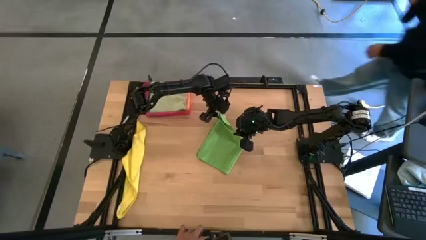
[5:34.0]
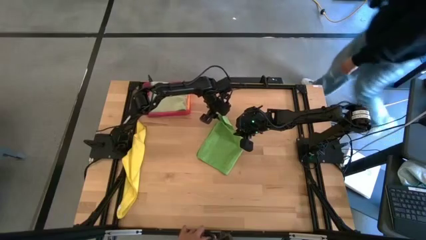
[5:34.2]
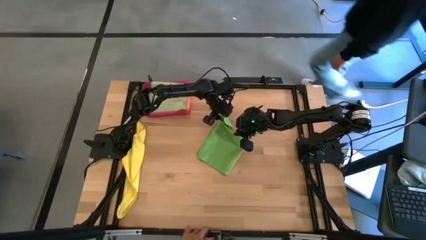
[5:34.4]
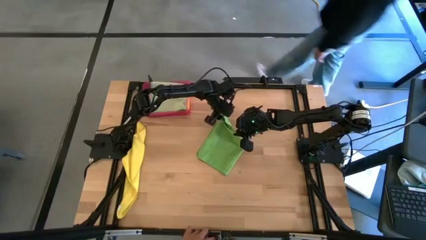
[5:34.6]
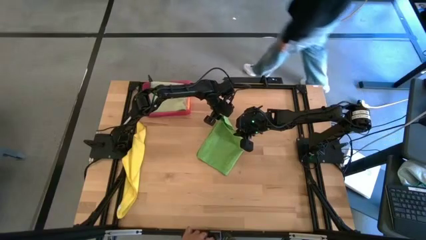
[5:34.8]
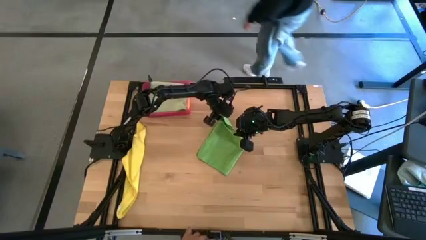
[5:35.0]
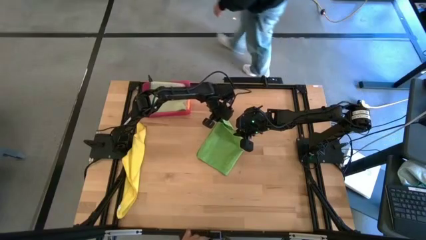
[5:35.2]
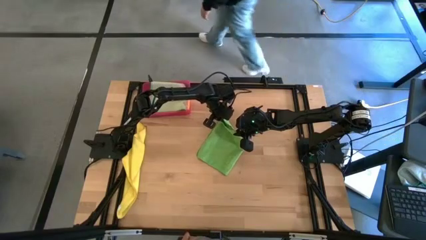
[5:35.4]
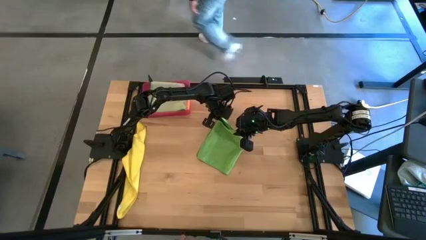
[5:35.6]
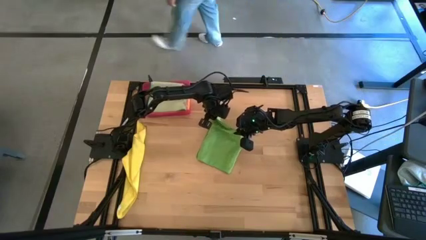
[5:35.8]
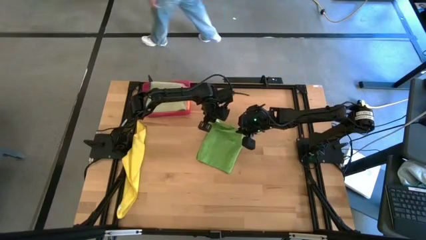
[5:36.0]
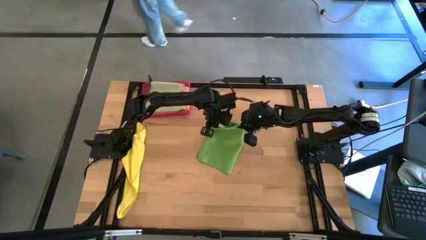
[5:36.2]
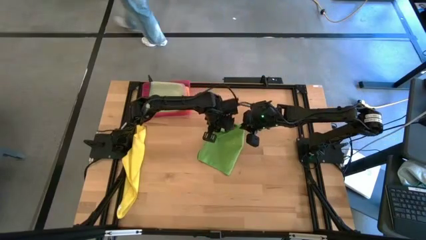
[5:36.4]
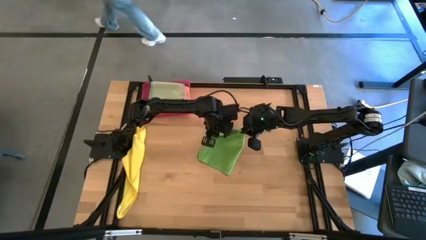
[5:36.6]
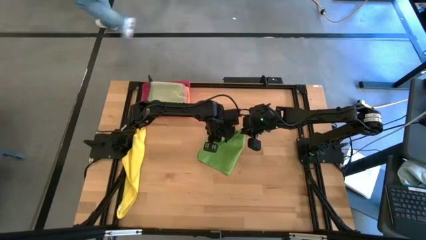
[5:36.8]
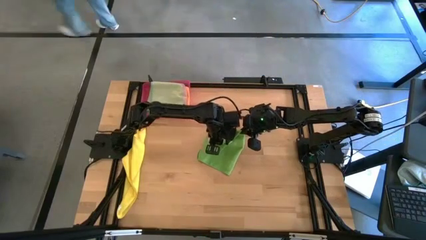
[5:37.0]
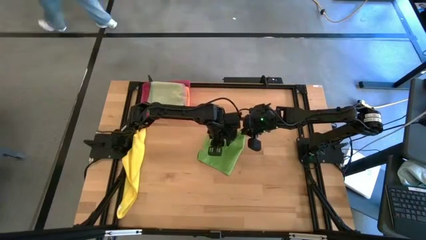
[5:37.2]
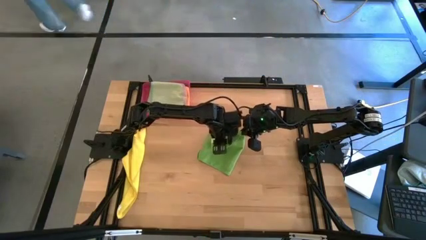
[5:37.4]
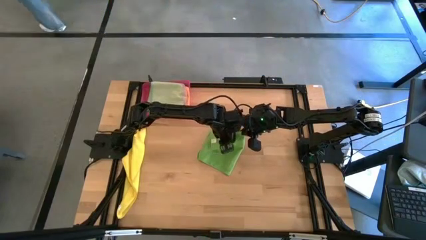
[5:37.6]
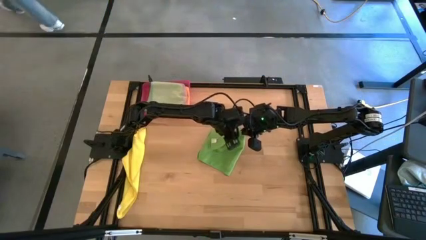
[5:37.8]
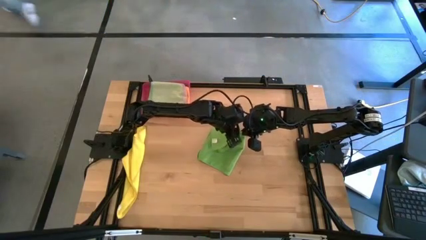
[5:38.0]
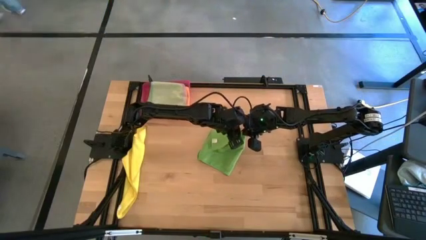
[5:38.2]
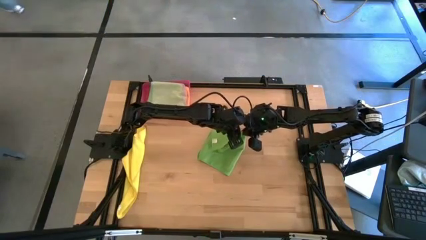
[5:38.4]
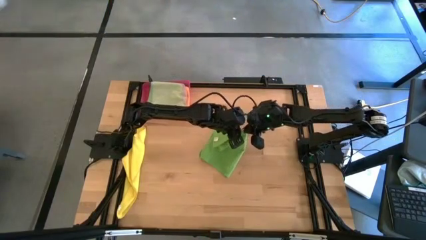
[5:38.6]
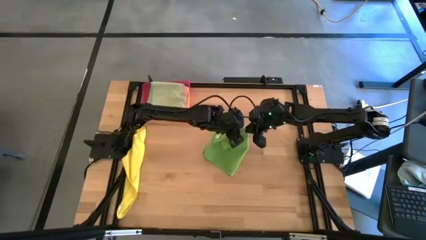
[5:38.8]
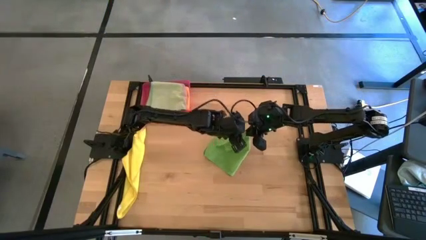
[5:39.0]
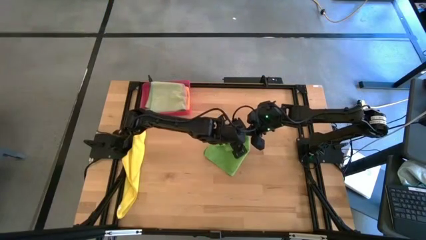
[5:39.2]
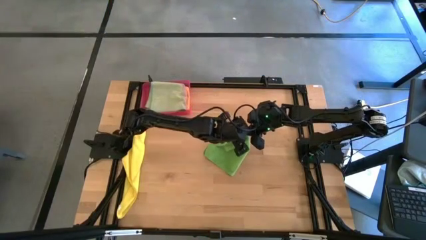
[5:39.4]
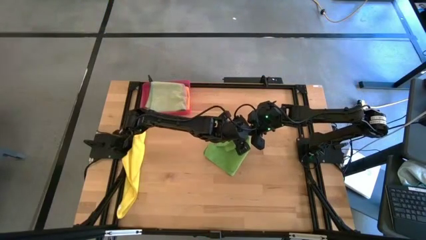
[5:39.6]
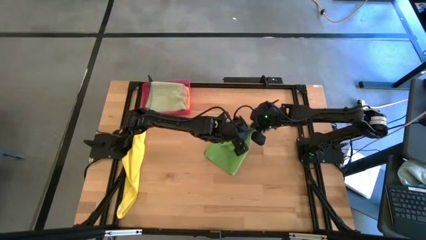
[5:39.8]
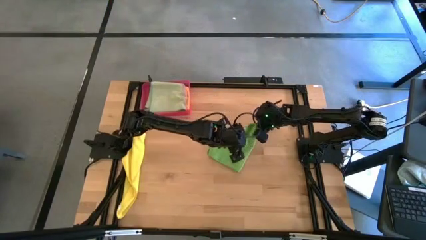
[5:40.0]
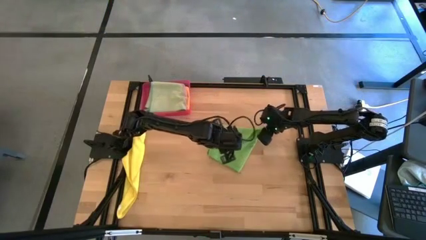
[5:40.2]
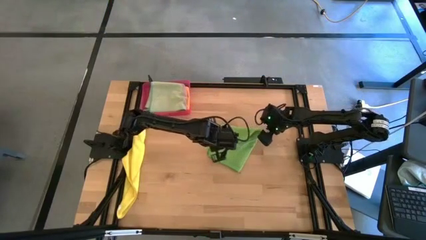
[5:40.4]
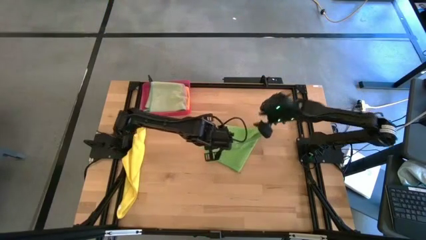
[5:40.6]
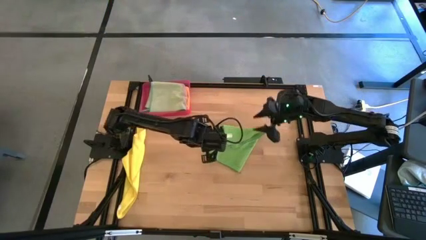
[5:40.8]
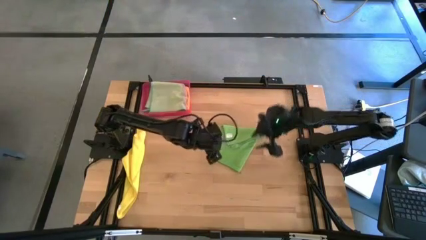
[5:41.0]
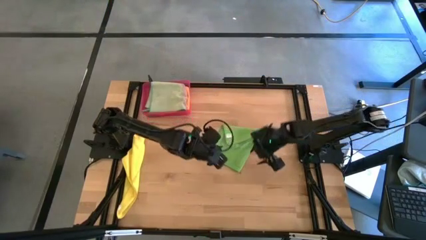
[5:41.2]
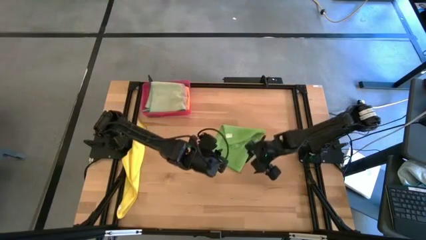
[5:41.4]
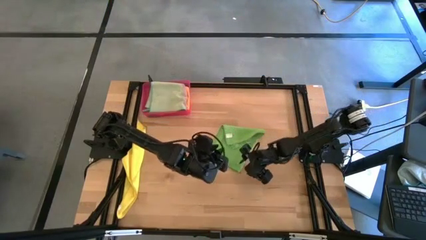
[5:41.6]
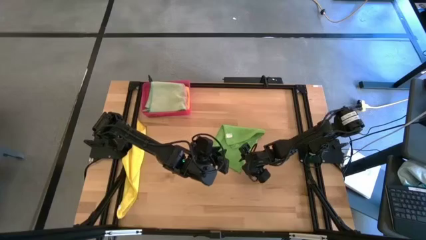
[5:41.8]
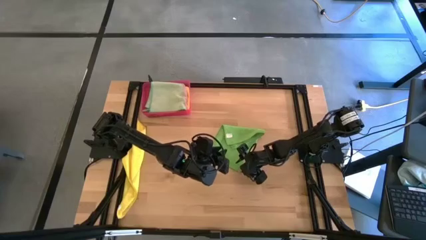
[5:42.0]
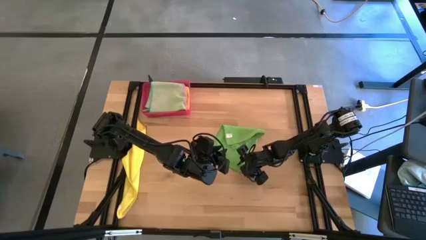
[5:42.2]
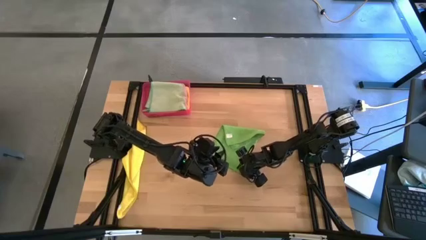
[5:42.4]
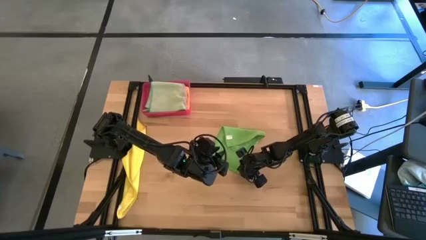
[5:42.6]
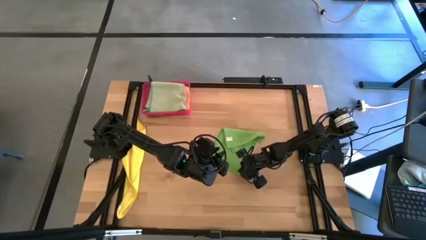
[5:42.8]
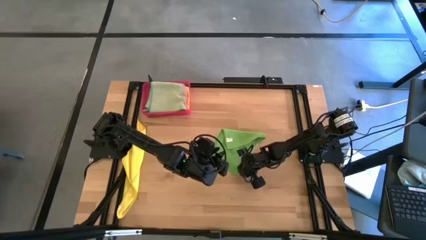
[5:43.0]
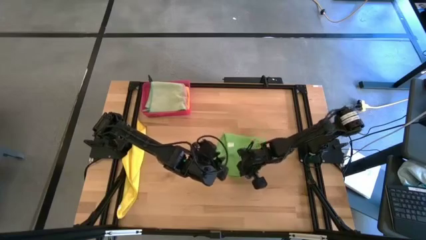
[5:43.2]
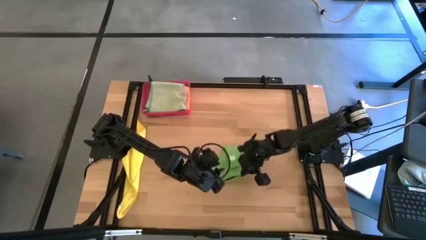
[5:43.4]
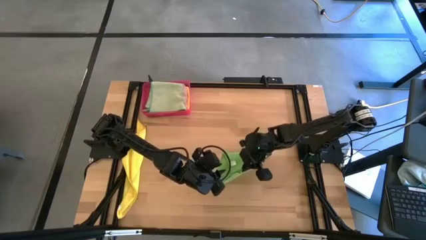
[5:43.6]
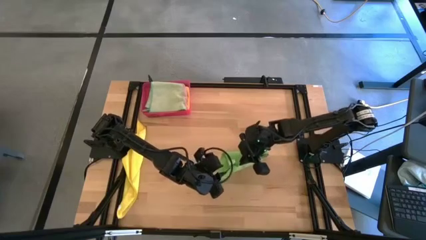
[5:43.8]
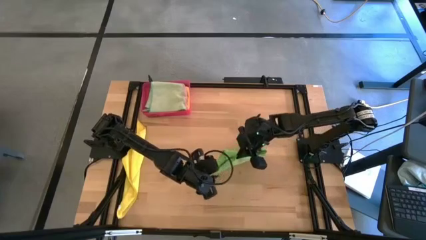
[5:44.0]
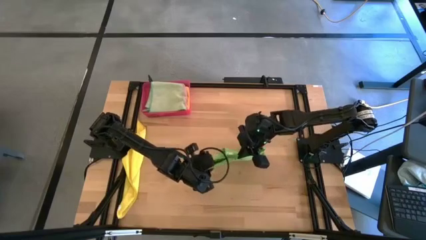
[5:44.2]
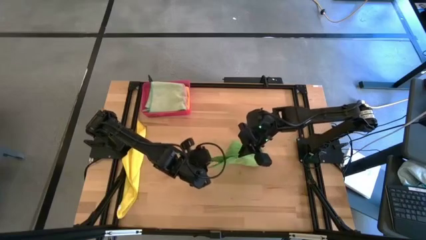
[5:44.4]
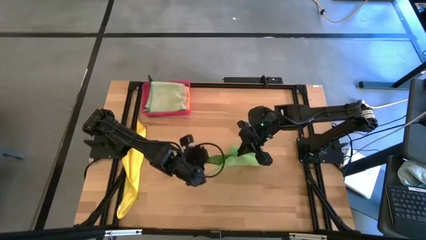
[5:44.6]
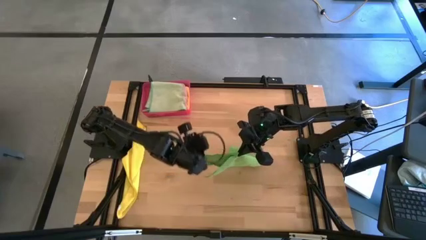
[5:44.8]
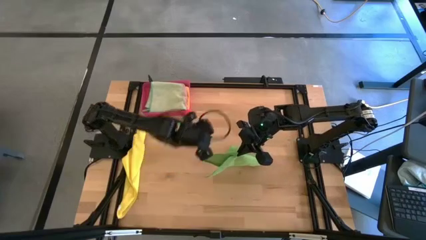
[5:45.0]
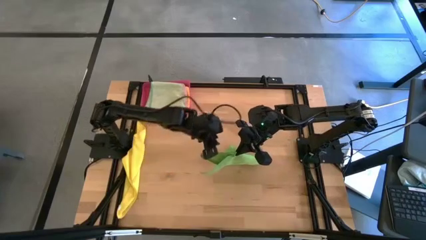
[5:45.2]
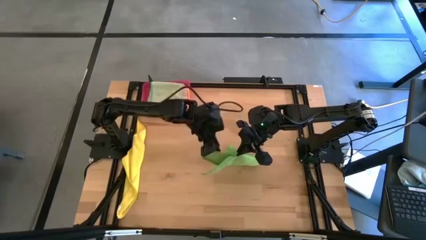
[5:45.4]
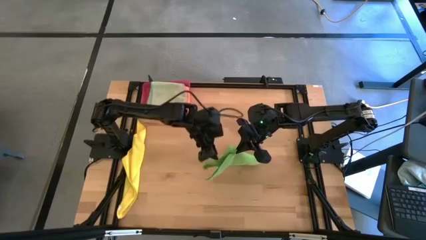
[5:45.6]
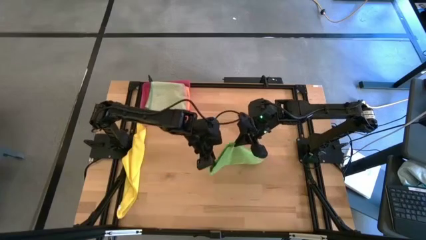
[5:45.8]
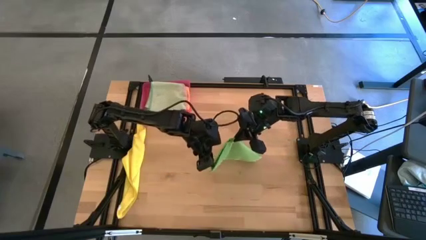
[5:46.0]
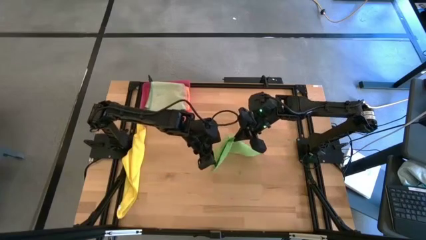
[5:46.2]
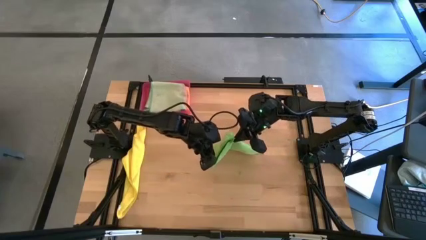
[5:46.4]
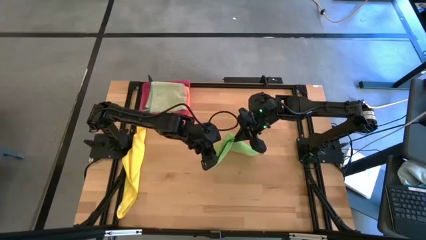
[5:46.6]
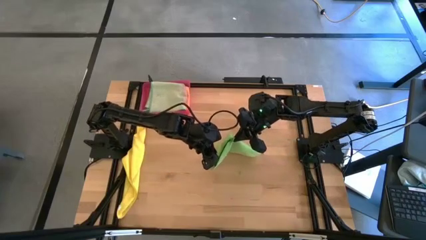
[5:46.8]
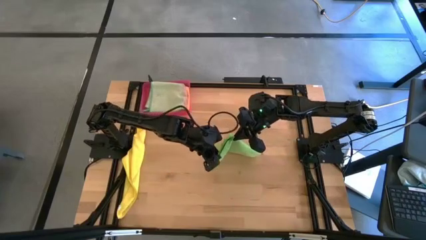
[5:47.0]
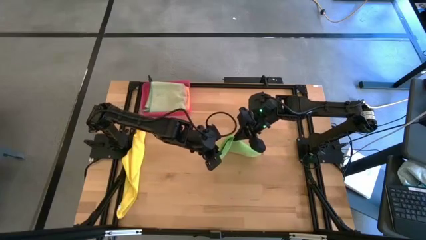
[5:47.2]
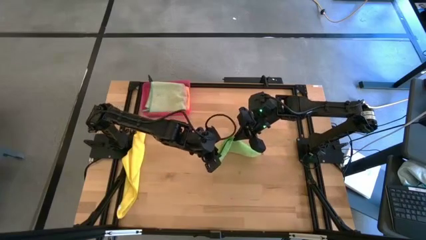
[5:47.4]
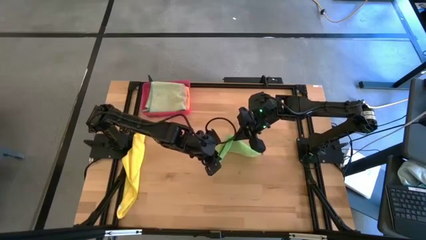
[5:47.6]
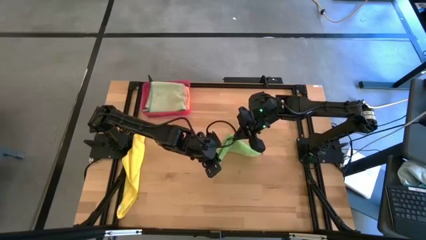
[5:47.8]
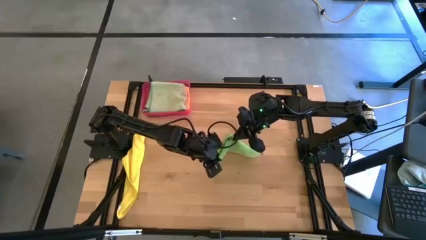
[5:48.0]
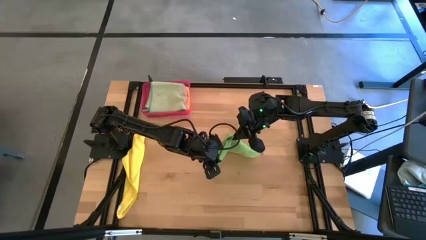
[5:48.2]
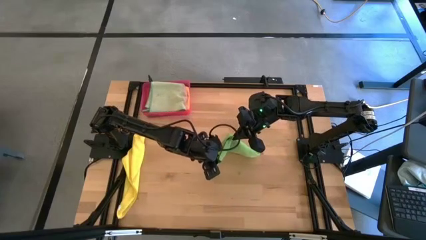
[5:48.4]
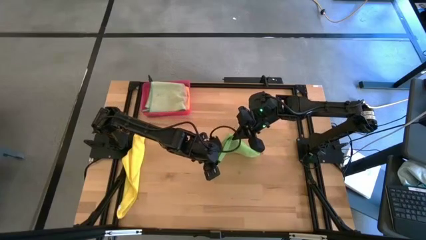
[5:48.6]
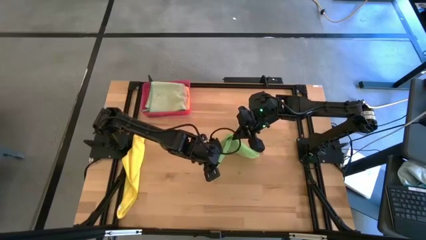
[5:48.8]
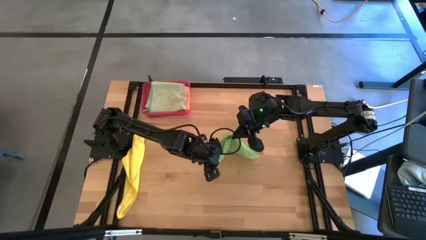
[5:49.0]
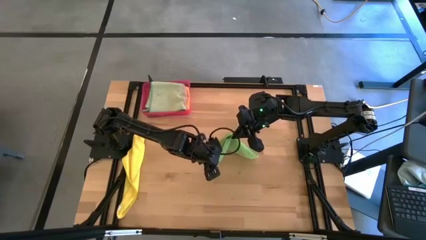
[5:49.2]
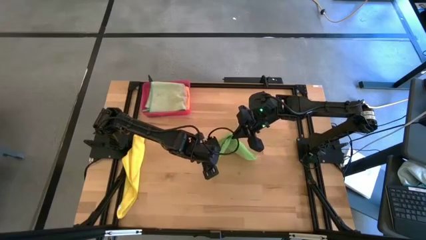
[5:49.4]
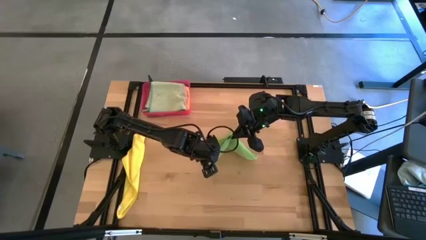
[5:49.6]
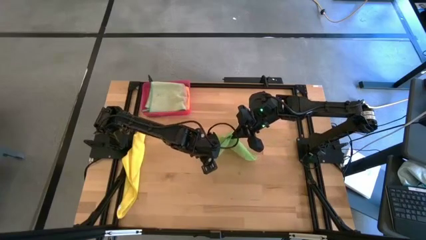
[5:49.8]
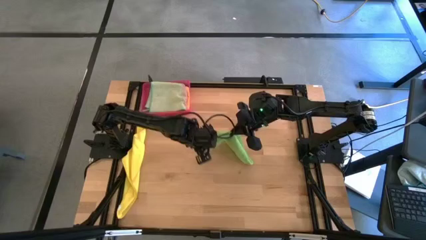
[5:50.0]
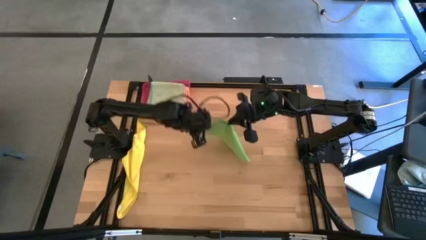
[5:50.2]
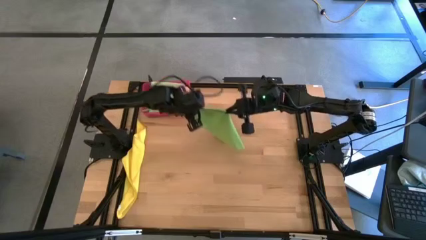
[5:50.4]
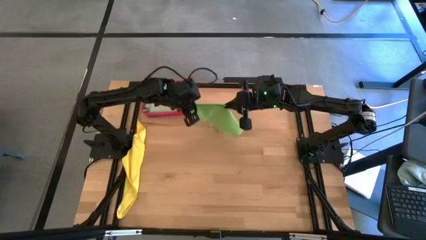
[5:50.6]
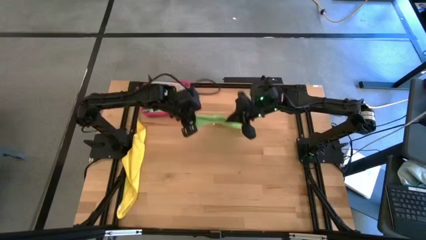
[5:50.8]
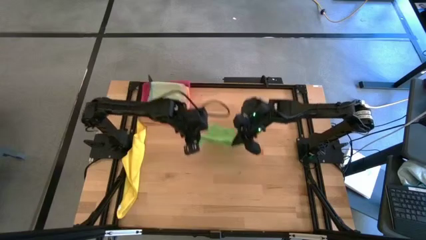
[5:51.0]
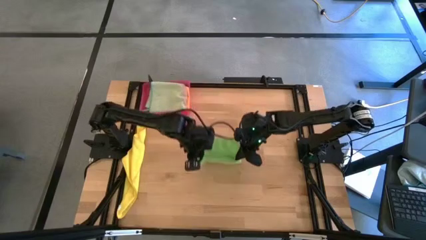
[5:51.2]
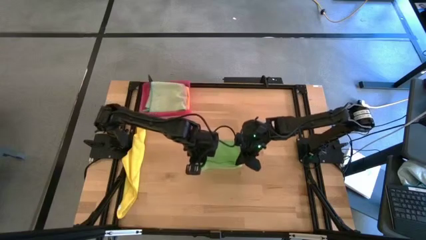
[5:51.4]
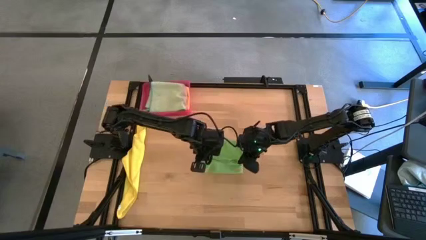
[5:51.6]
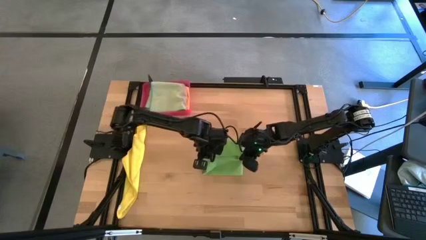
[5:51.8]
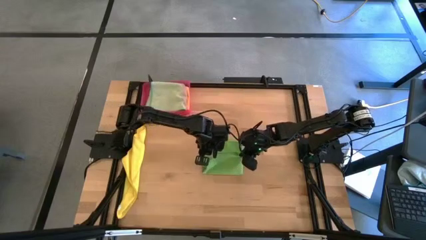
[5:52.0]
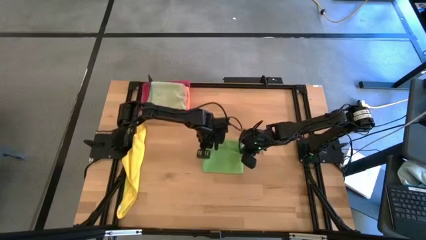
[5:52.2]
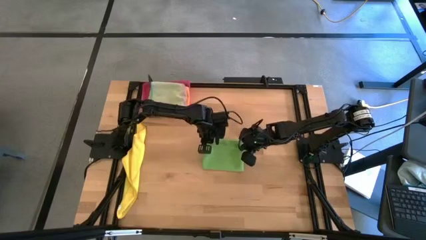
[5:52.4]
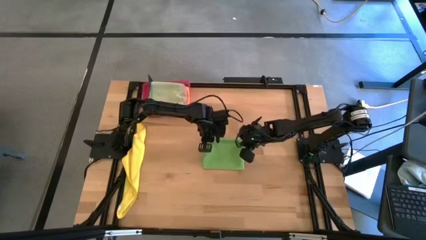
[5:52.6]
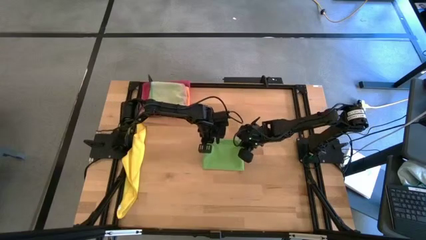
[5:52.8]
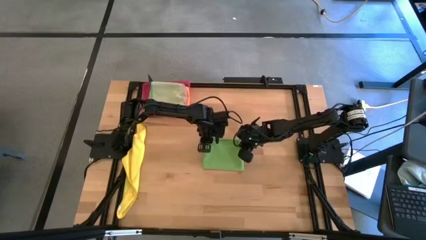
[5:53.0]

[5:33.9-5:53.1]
Task: Fold microfiber towels
Fold the green microfiber towel
